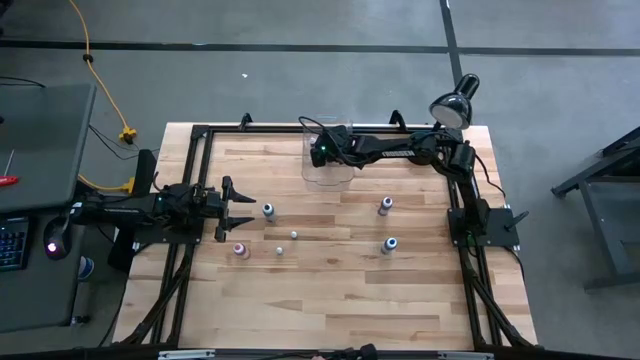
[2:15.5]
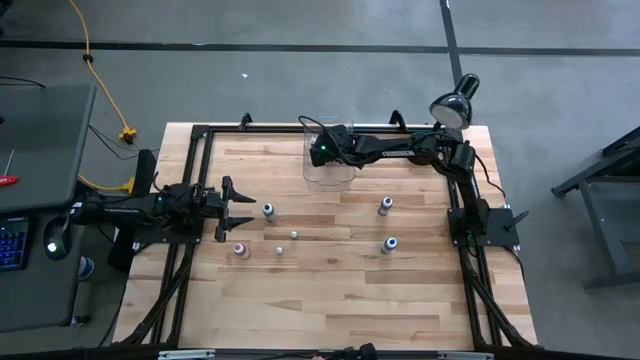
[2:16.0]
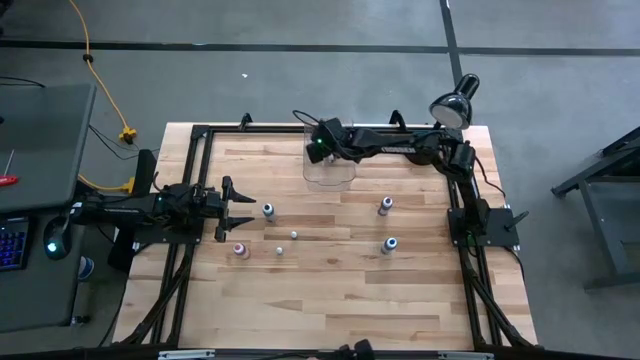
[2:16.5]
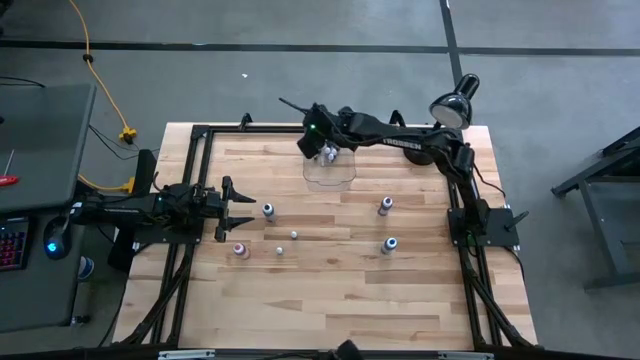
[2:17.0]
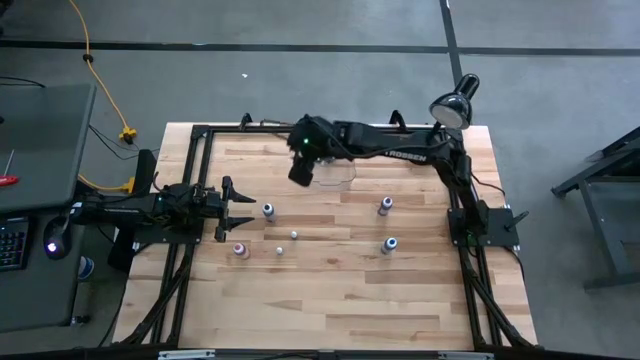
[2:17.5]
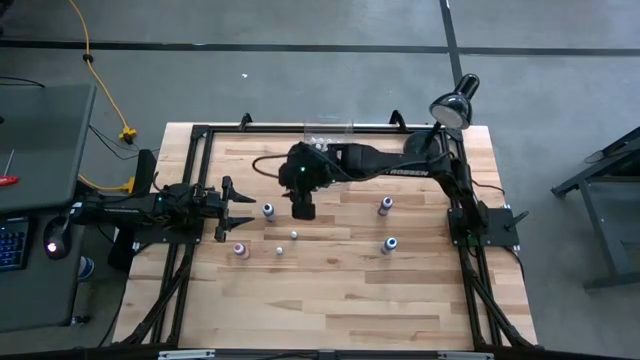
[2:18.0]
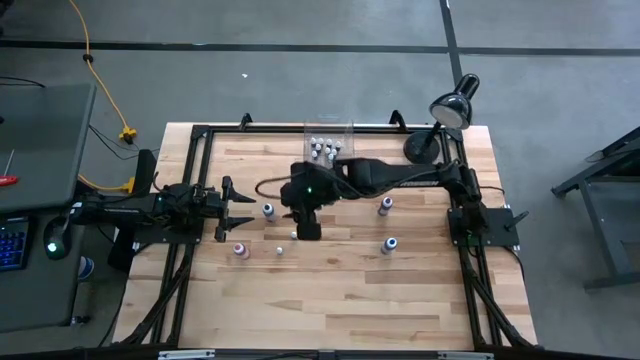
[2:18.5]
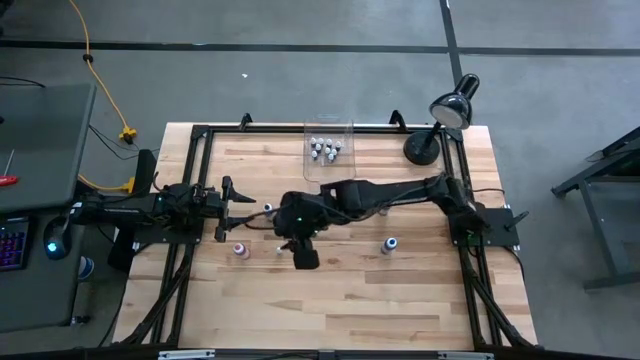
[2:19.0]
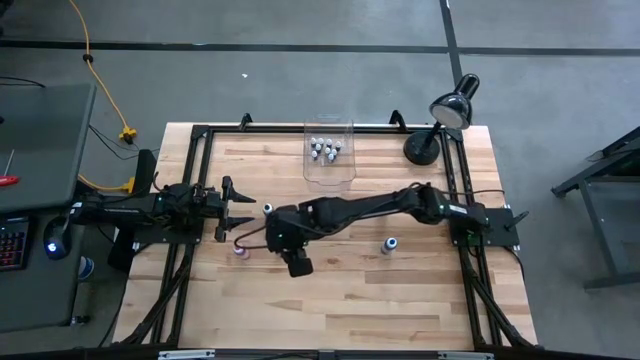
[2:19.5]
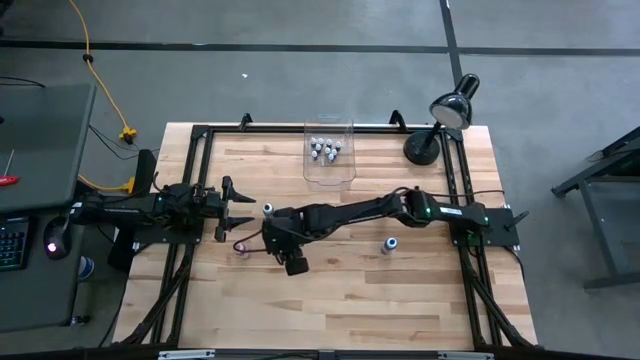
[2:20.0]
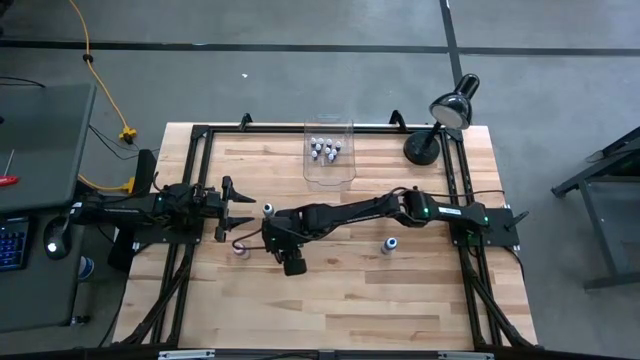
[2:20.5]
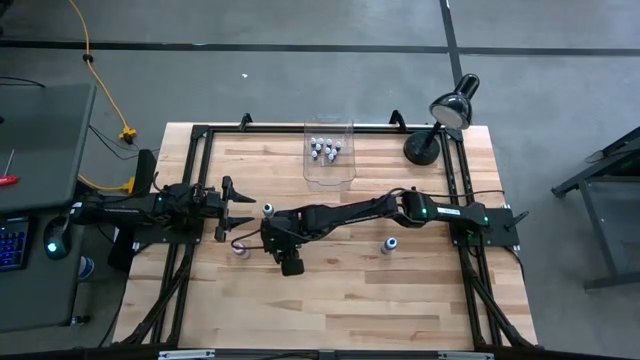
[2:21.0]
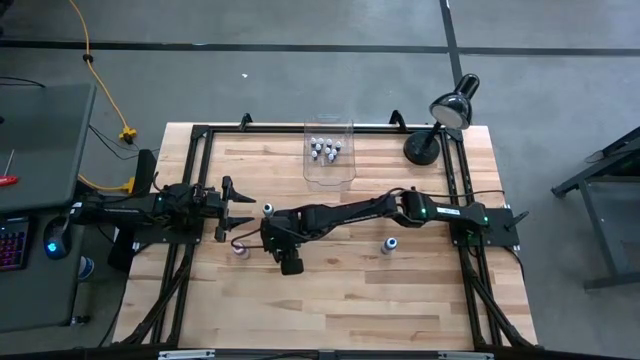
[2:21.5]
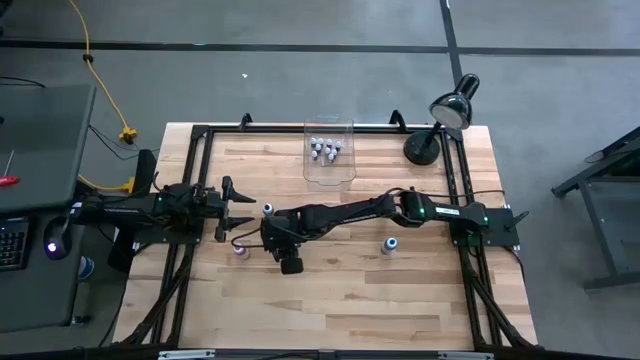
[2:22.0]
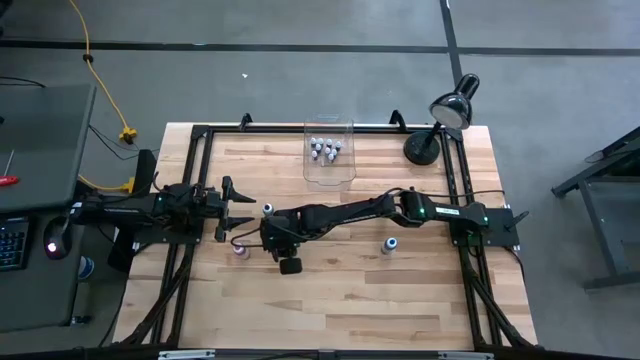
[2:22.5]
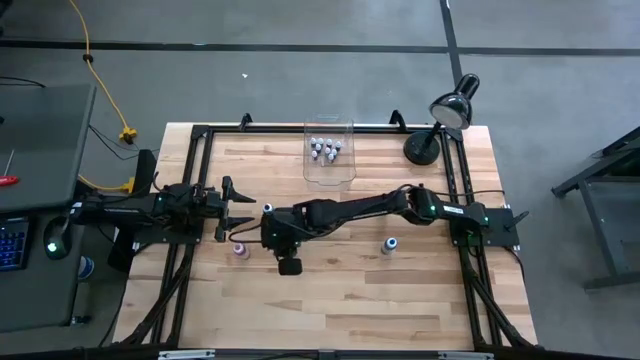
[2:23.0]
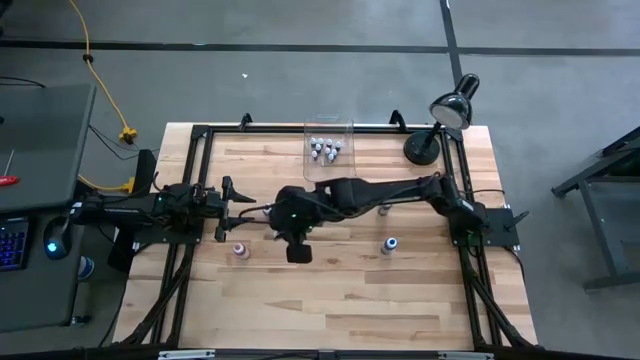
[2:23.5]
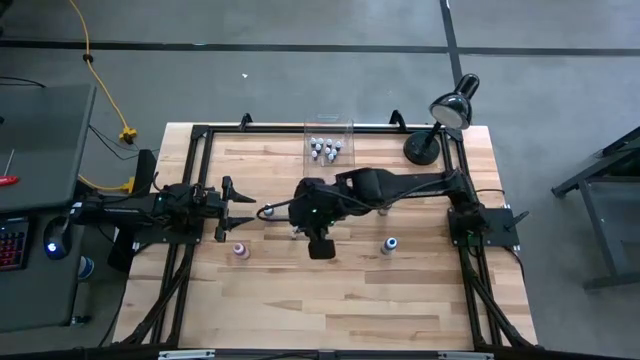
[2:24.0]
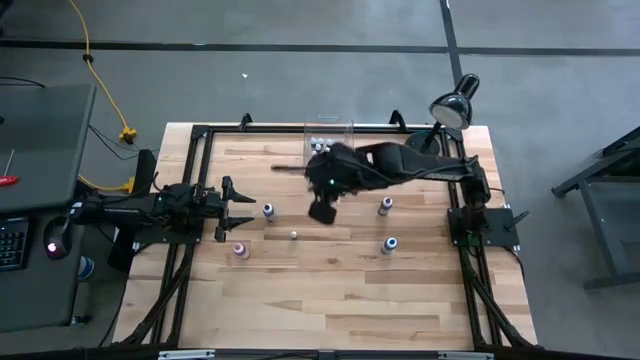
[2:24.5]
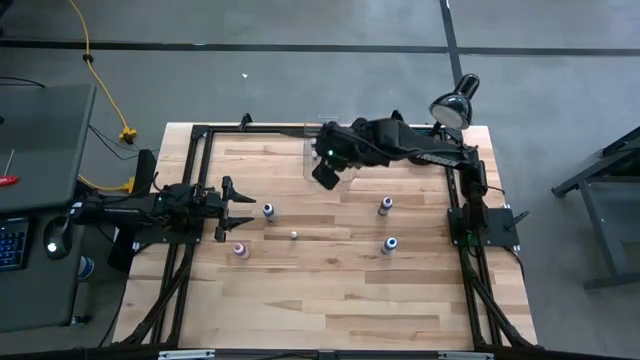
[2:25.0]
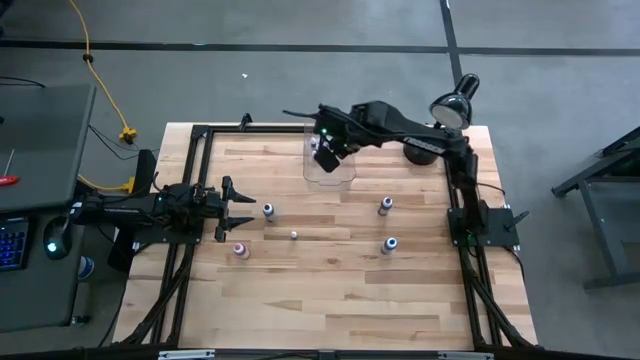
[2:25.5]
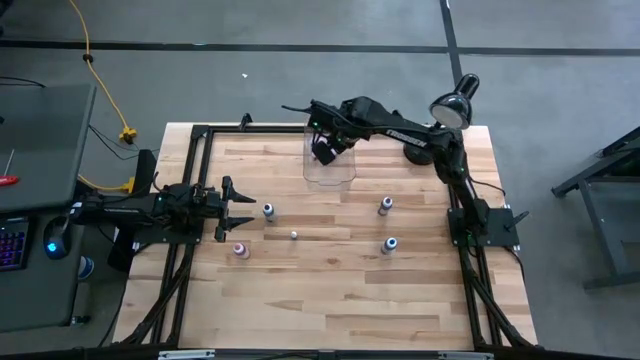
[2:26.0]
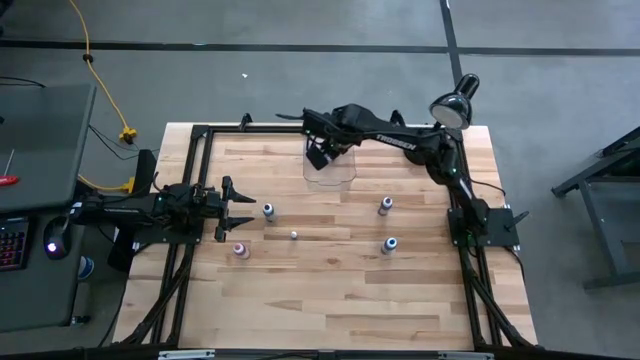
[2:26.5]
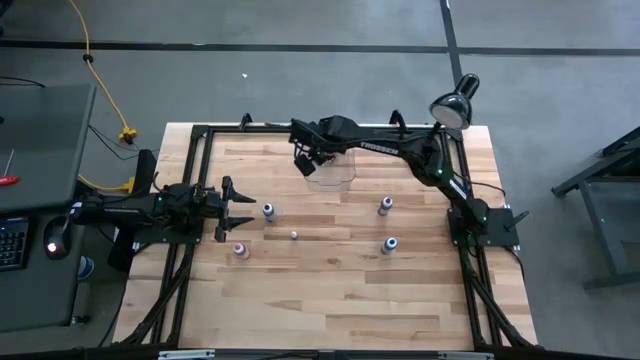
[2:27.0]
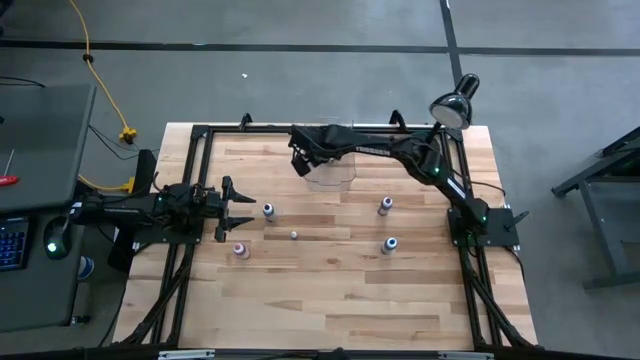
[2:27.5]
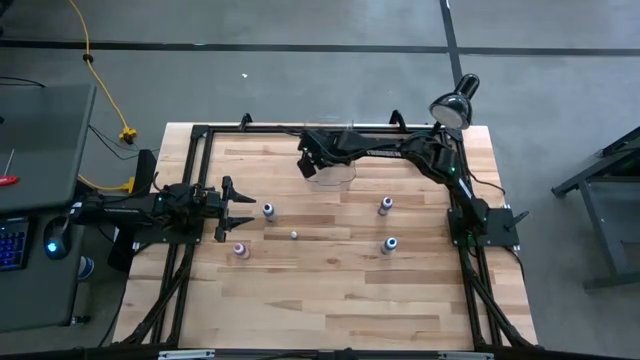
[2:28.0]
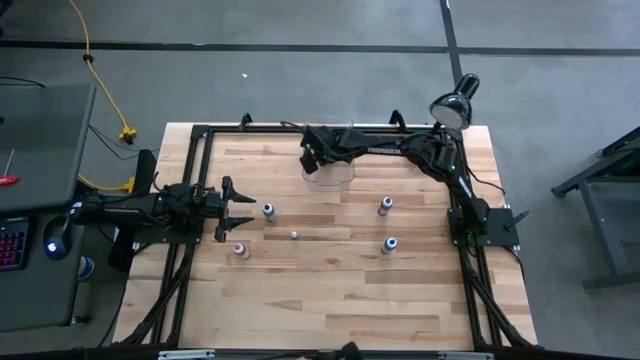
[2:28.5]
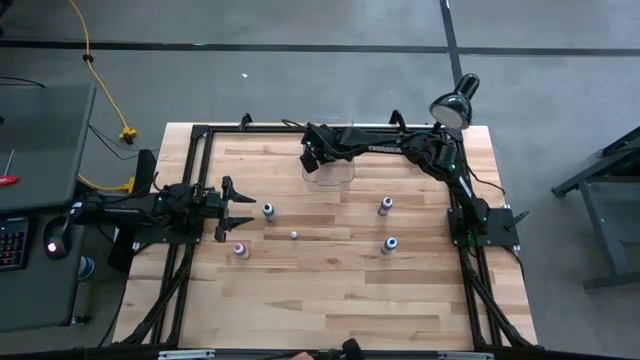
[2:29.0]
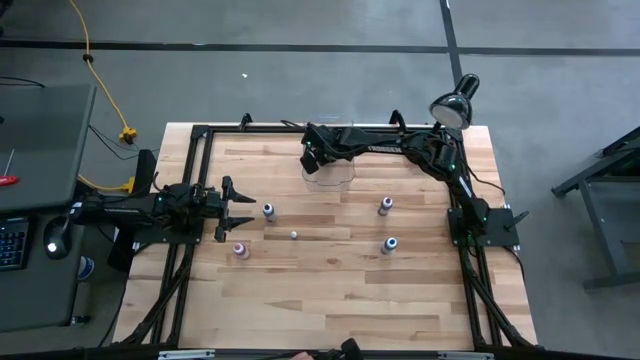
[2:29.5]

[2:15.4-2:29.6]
Task: Pick & Place food coloring
Put the small food coloring bottle into the transparent bin

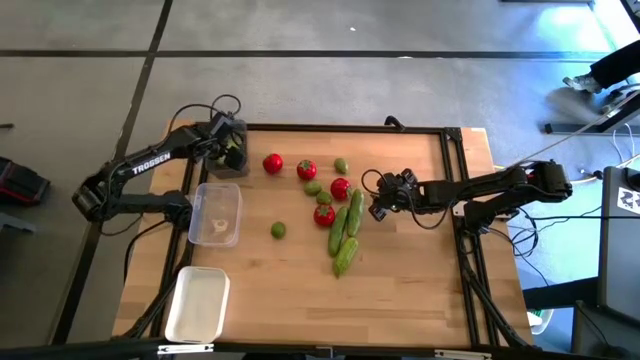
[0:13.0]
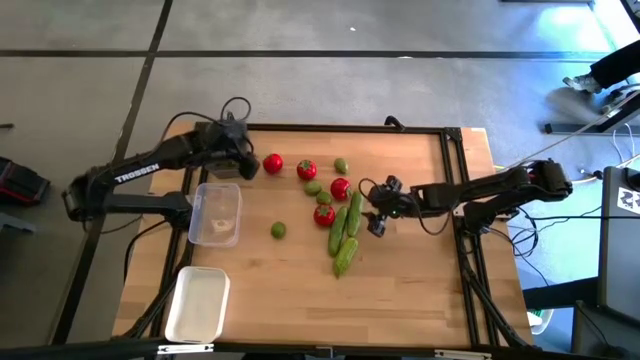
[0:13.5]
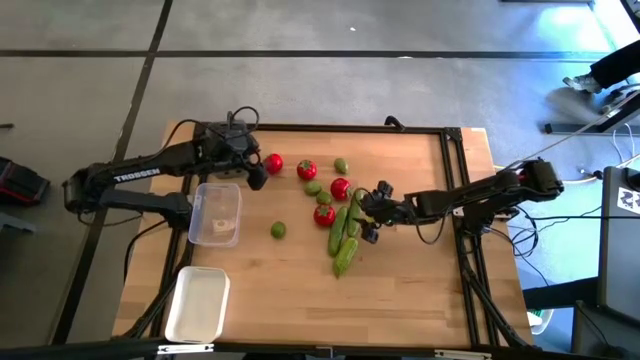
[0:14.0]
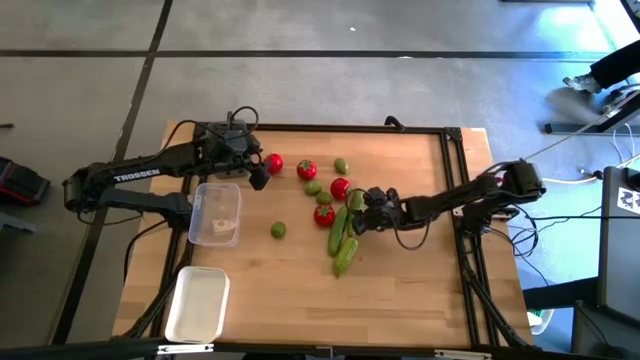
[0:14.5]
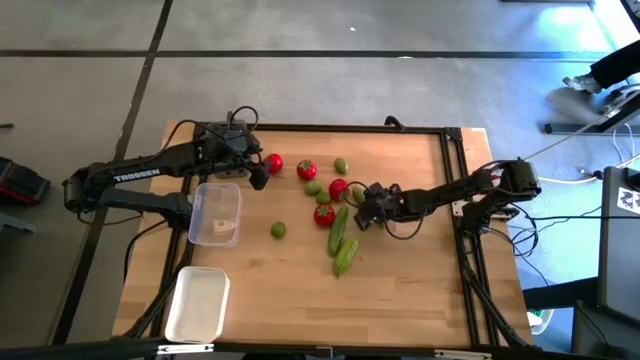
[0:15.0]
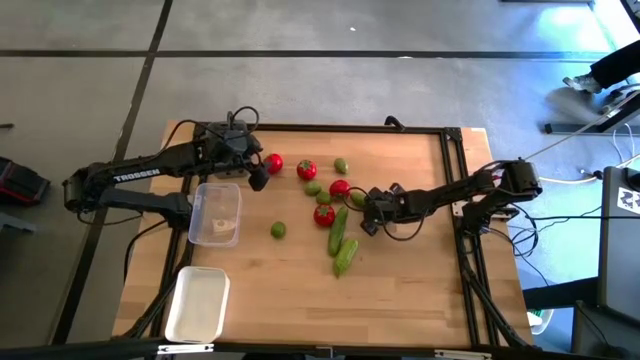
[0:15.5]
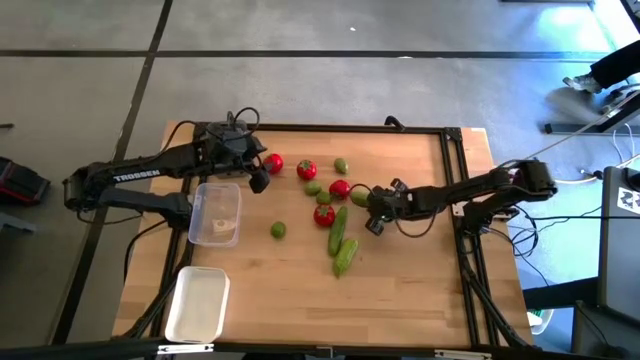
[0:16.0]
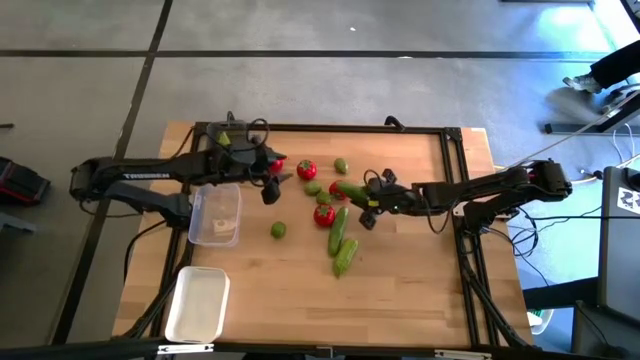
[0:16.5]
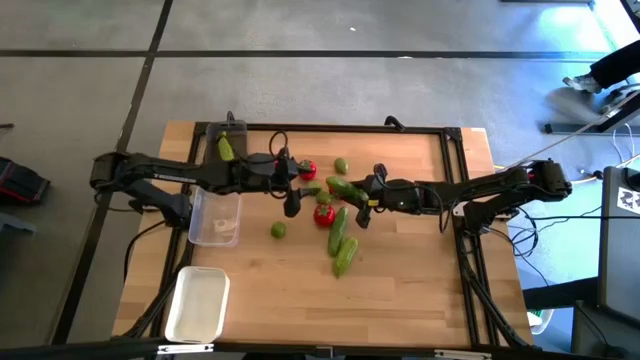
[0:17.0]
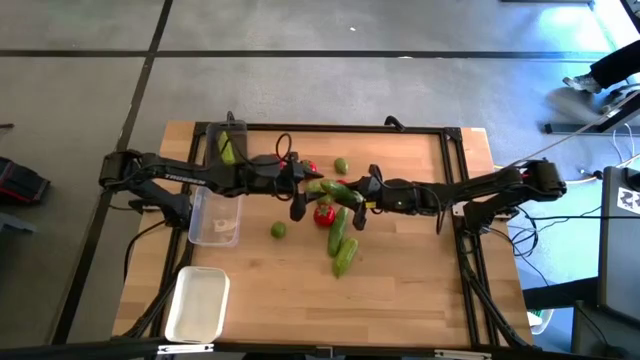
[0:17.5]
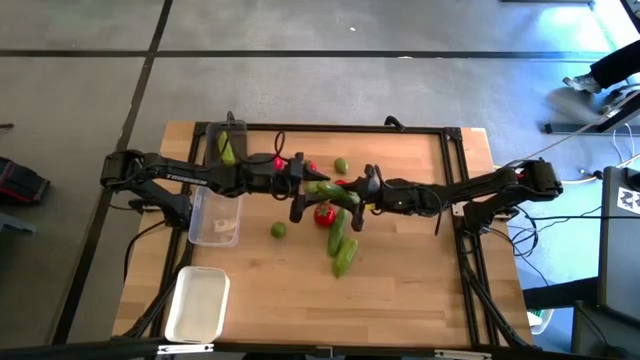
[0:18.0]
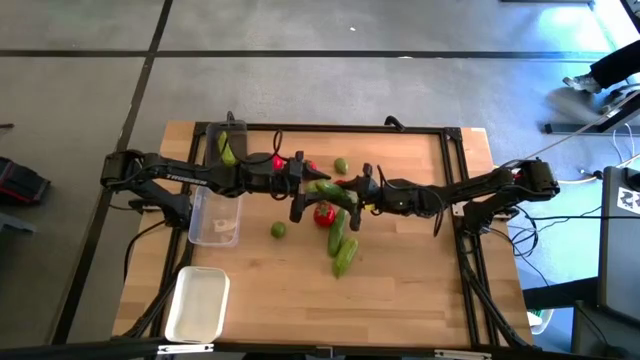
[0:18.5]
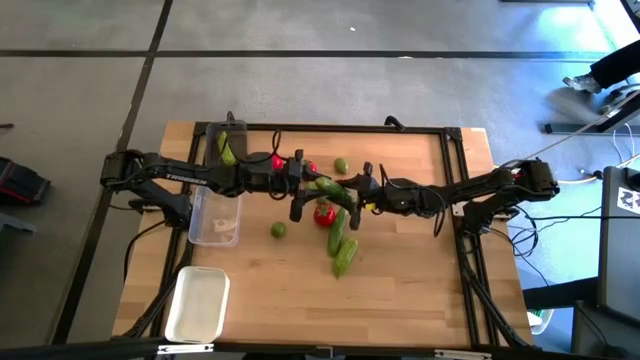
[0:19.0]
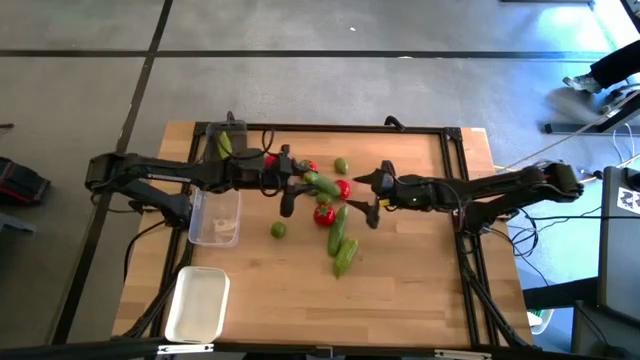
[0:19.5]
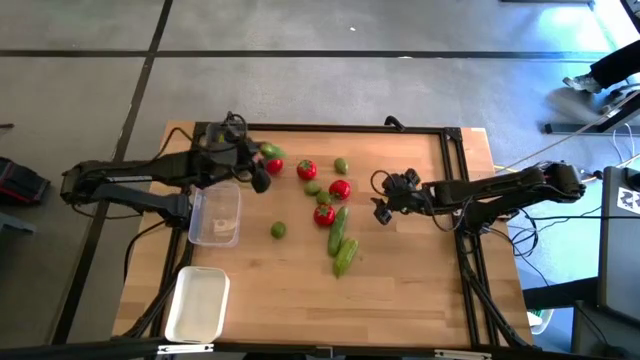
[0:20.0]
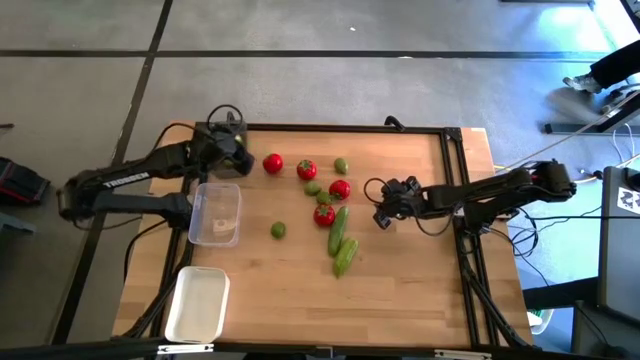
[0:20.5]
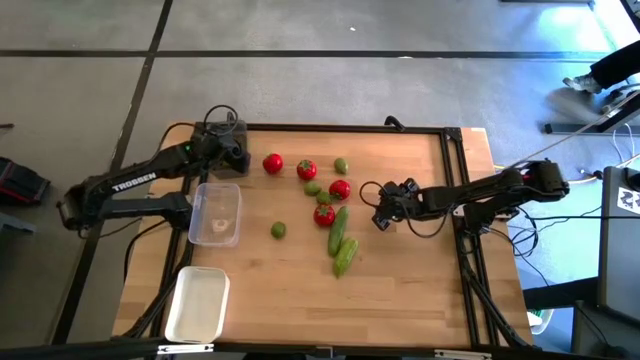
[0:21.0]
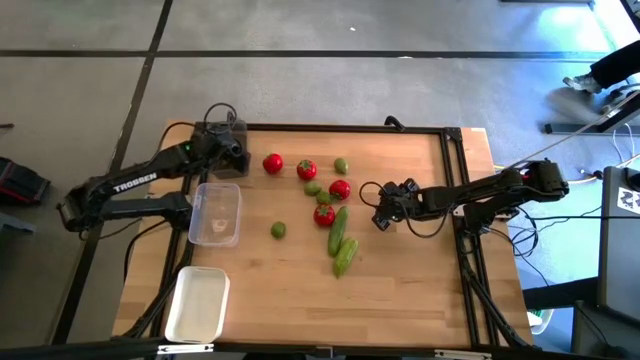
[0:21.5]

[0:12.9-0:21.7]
Task: Sort produce into baskets
Put the cucumber into the black bin
